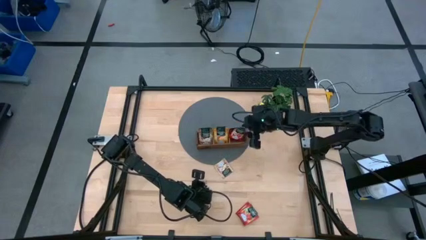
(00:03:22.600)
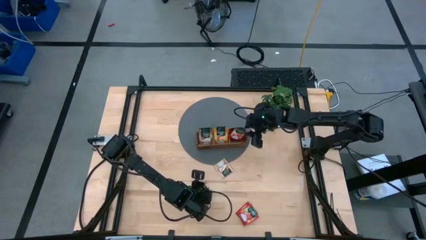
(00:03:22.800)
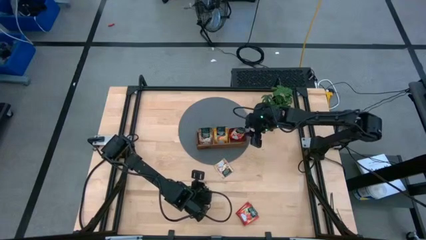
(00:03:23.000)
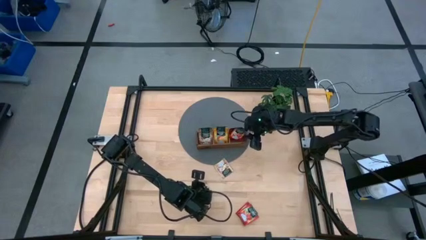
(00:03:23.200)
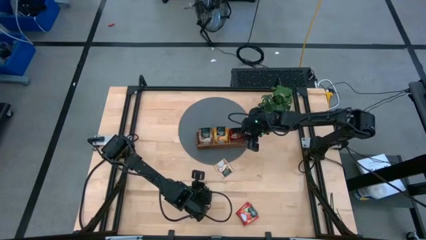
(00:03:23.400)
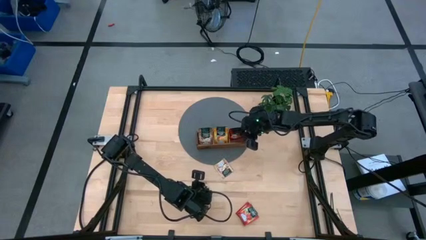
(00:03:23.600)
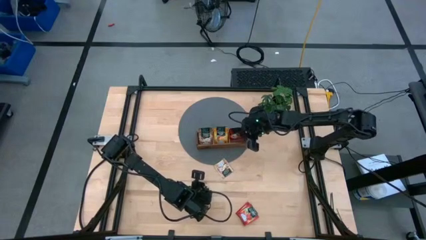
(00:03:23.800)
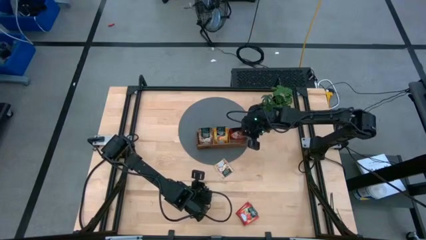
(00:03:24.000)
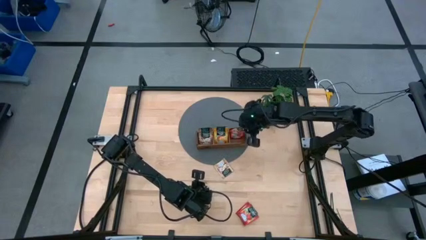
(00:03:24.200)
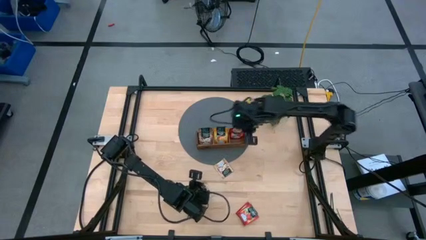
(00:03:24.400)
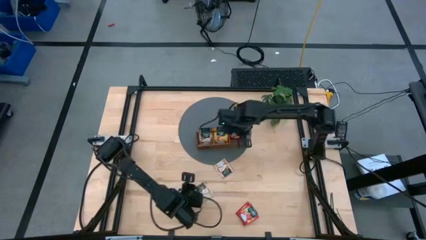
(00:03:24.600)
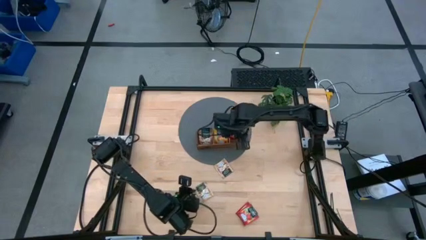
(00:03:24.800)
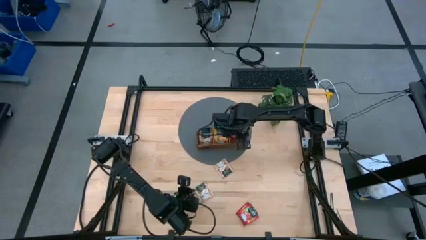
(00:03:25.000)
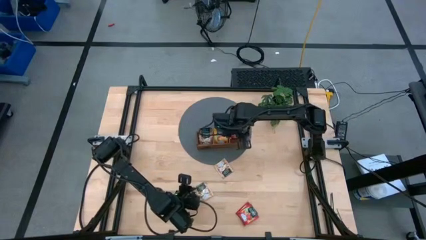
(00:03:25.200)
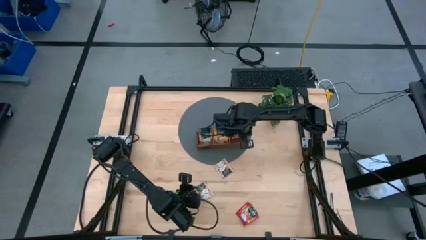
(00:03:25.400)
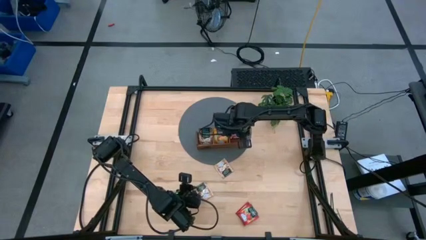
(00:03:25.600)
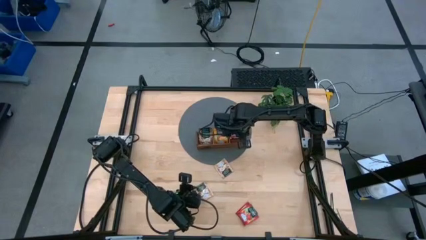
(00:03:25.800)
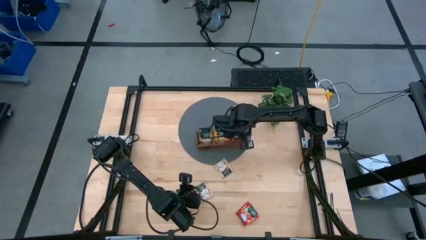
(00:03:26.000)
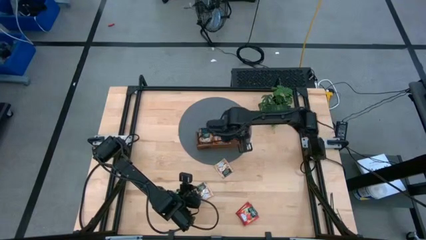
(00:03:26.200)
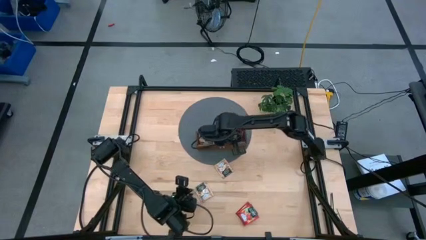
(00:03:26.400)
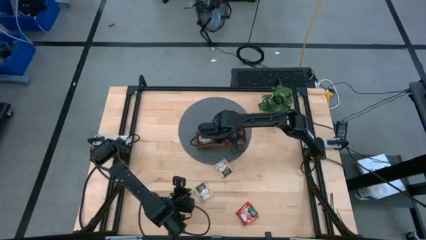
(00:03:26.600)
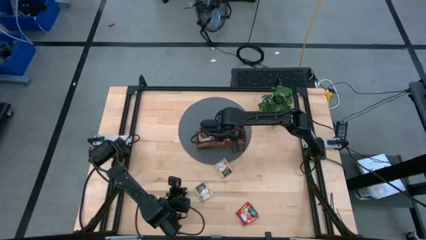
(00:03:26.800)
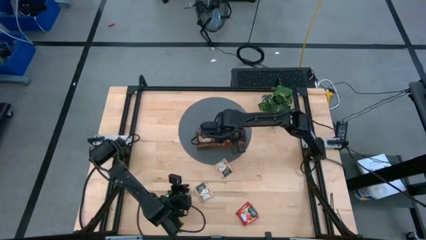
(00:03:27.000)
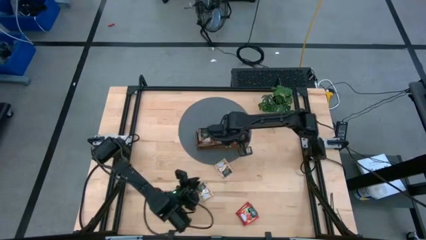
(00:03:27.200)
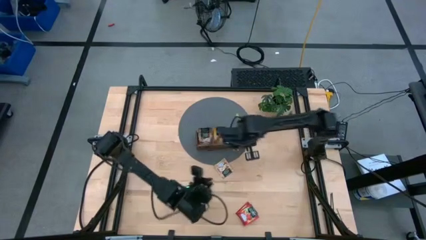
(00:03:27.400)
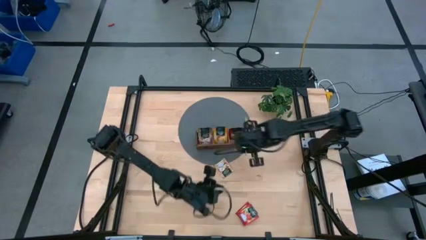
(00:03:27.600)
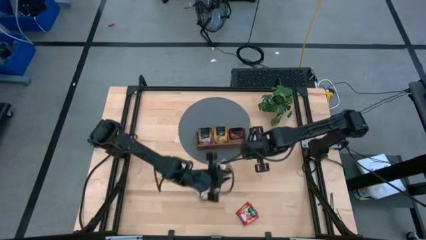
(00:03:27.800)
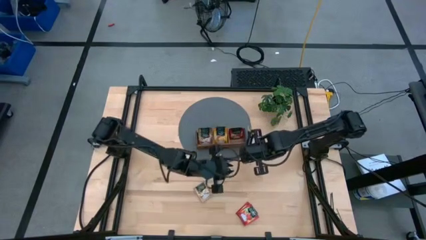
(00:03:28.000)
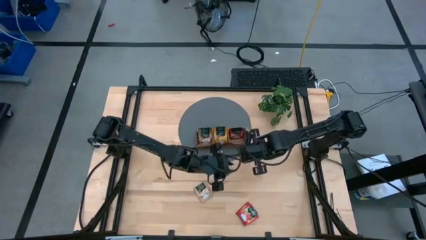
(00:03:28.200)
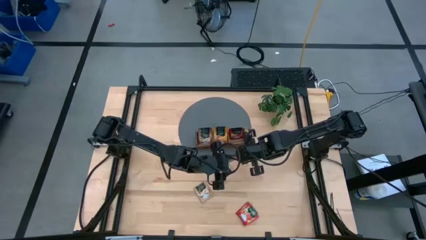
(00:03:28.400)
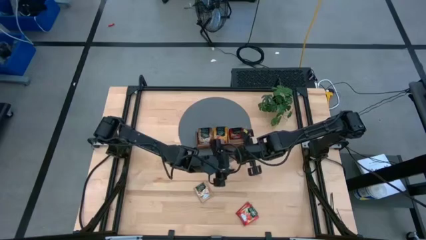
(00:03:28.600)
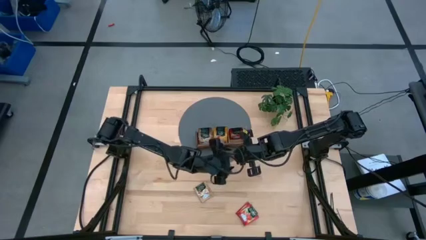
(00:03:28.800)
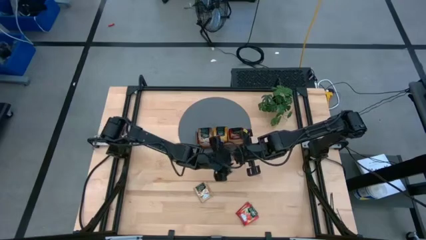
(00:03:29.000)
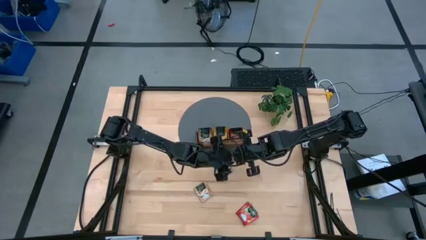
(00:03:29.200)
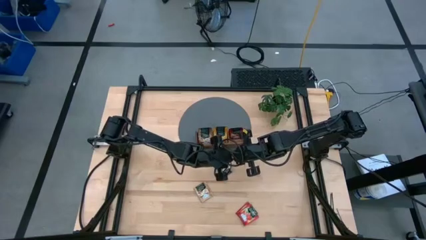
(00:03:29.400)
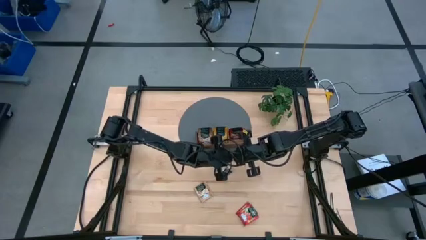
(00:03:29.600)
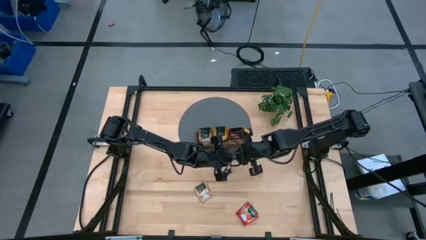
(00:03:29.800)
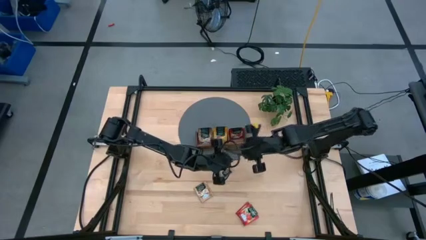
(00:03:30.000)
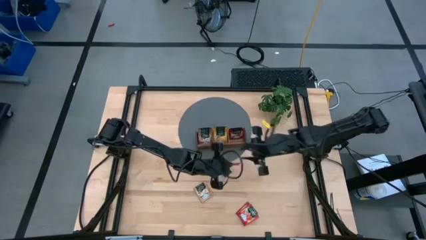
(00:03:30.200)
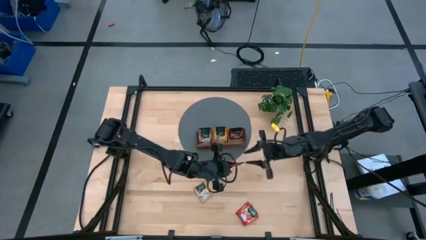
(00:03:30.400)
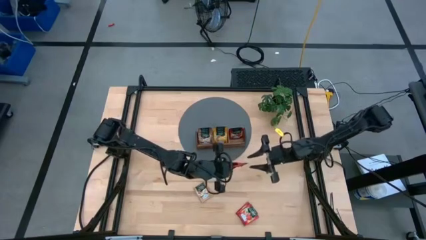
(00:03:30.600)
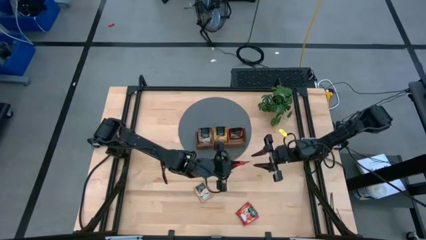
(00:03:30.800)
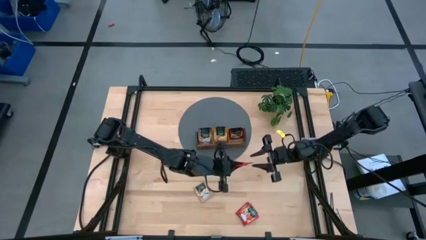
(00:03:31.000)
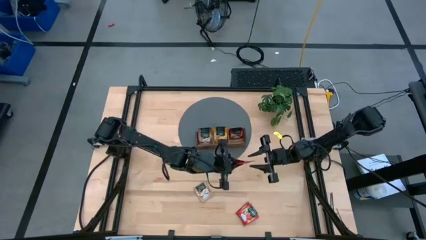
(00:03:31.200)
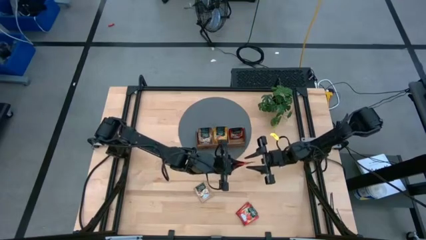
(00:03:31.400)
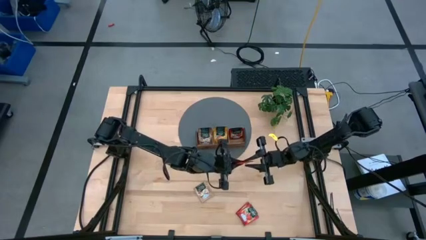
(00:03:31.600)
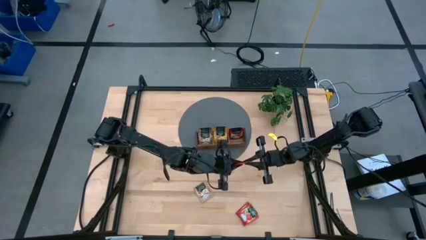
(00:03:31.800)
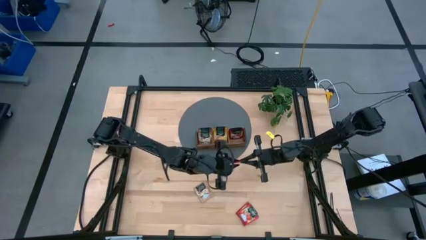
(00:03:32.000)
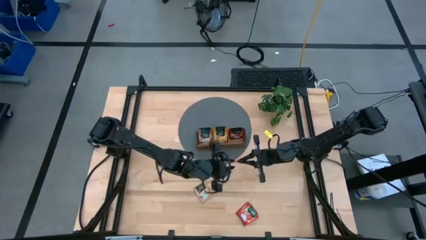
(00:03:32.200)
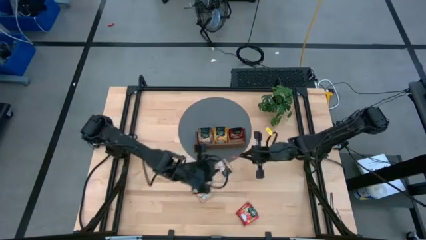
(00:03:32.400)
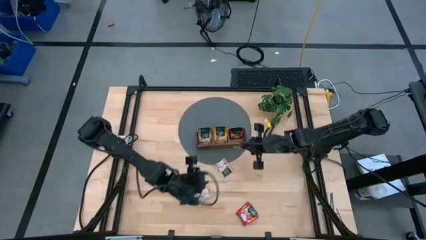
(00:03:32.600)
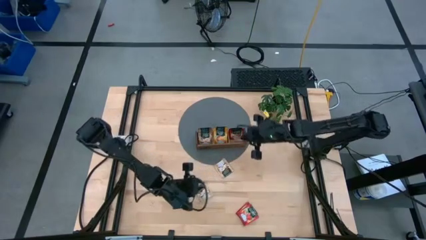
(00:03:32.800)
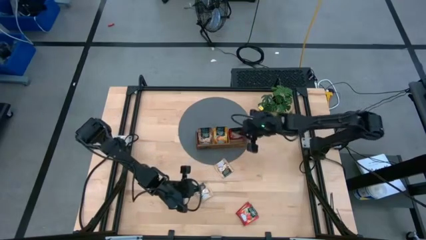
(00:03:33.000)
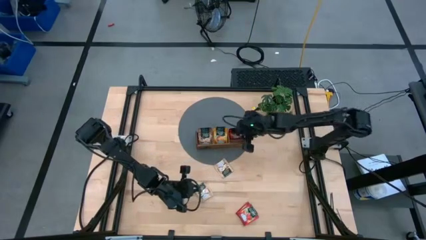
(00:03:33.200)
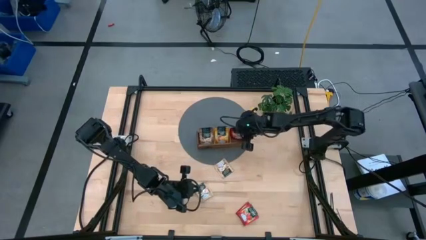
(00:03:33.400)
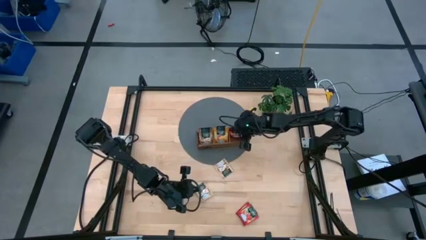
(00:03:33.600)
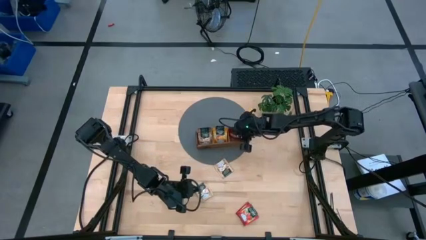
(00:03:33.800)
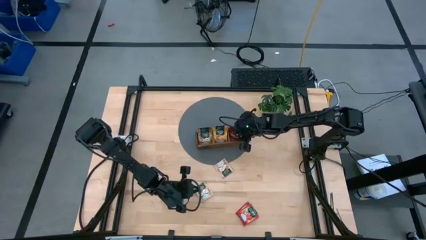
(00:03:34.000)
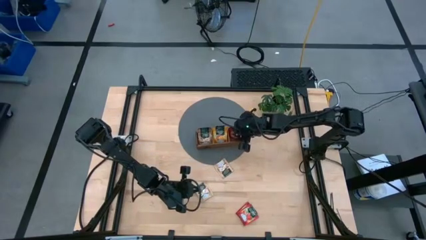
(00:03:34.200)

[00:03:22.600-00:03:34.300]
Task: Pick & Place Tea
Put the red tea bag into the right section of the wooden organizer

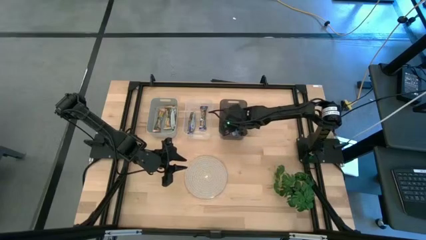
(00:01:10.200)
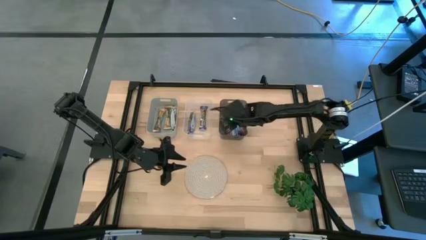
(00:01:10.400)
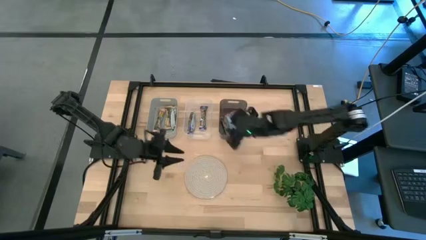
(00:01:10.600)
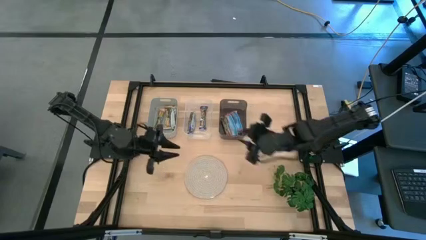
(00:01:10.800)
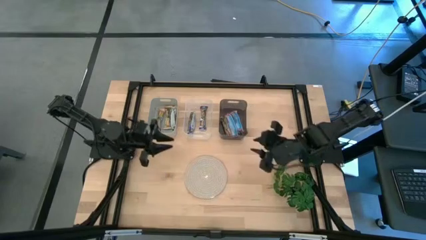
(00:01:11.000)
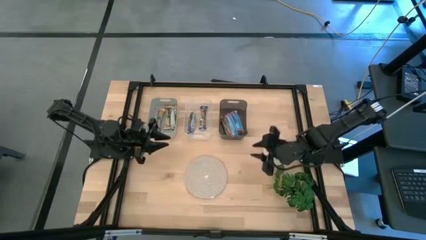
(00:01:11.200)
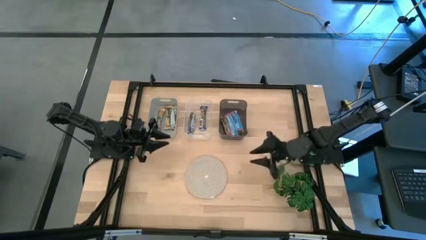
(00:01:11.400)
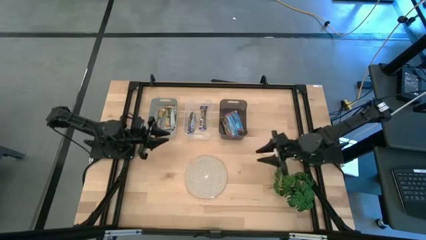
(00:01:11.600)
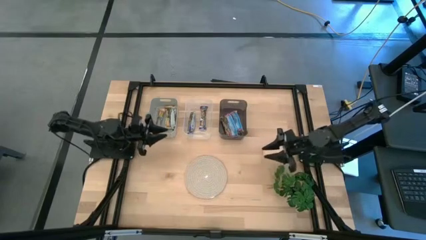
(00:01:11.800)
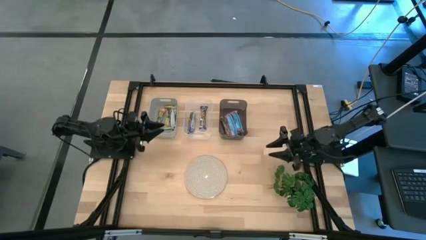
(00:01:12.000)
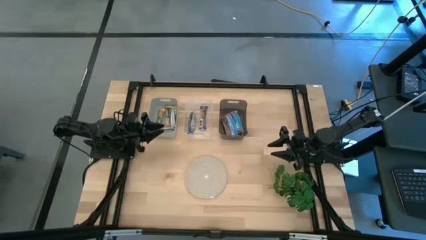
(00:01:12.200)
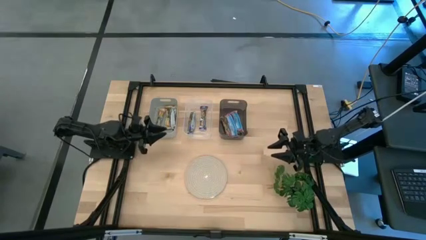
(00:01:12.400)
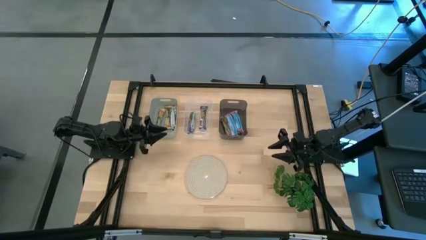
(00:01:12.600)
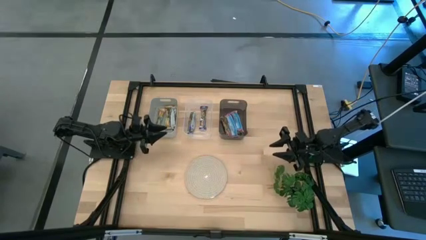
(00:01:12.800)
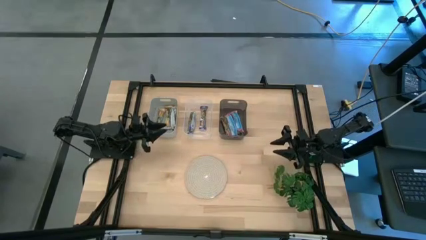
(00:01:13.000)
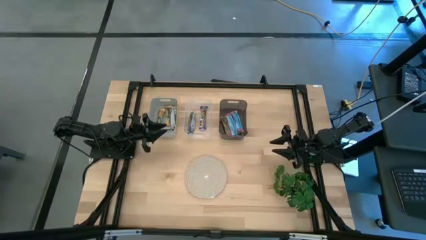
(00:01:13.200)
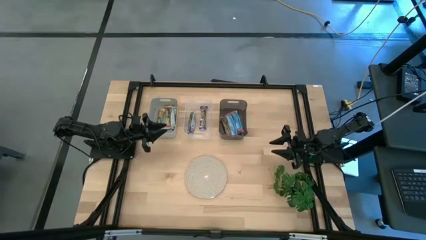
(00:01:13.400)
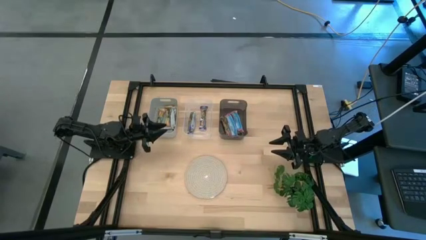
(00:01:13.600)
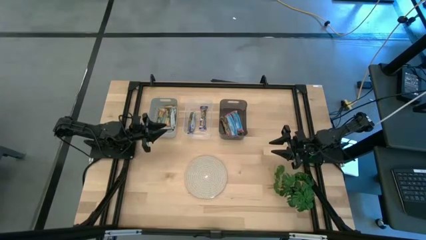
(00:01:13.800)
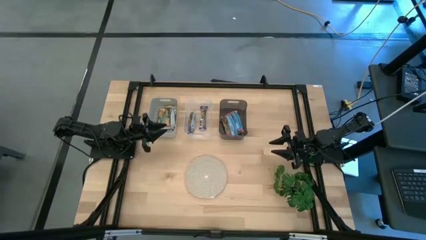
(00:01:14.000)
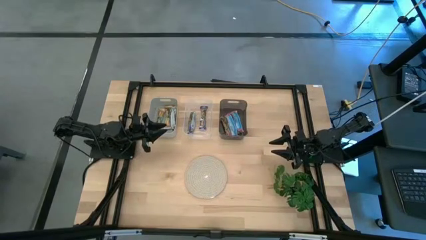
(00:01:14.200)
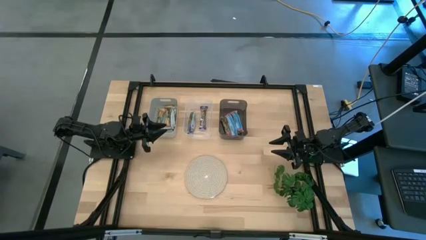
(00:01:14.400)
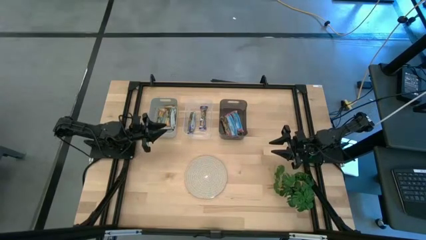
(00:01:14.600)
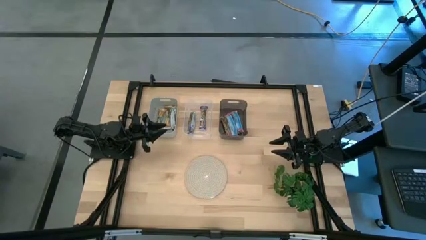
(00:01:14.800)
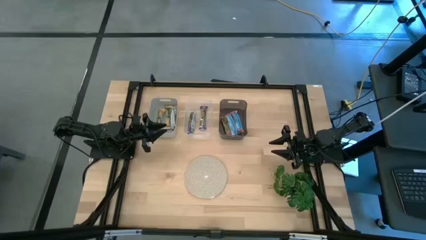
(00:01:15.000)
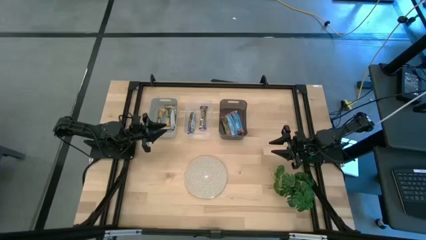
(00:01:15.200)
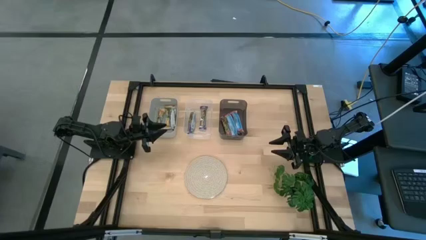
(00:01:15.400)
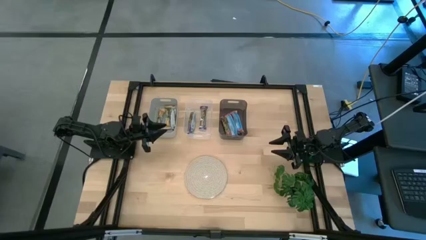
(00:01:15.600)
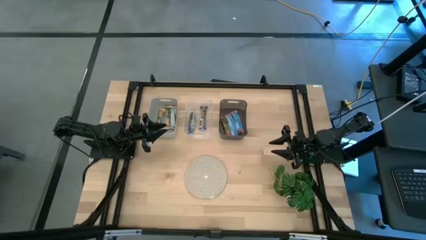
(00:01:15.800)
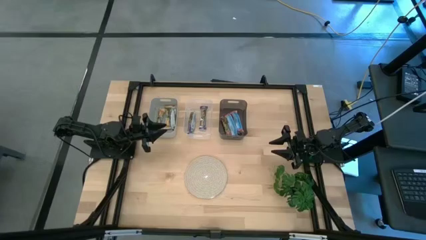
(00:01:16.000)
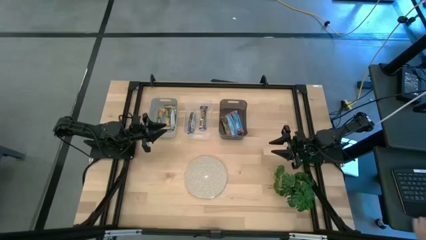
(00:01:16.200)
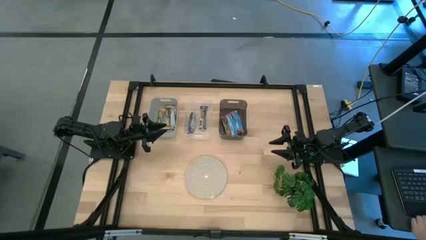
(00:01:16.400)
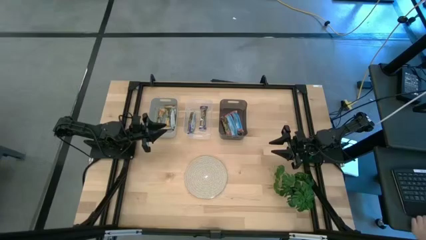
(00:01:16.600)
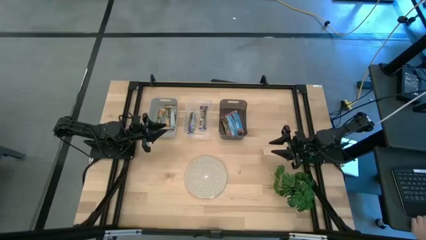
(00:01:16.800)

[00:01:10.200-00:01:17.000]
Task: Pick and place Granola Bars by type
Return to Home Position
